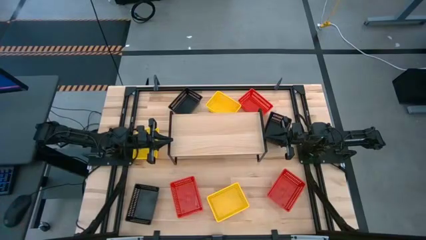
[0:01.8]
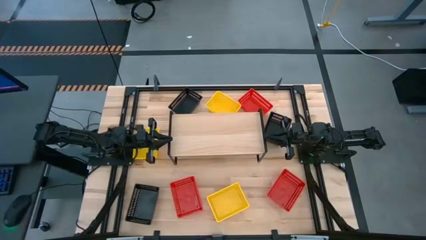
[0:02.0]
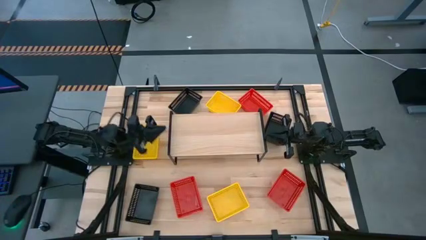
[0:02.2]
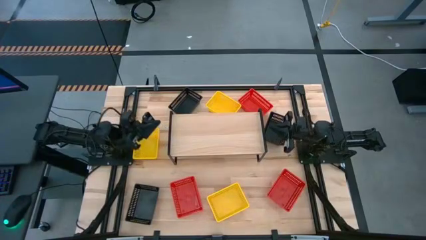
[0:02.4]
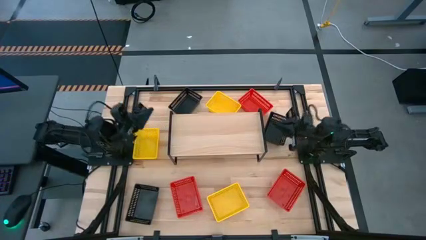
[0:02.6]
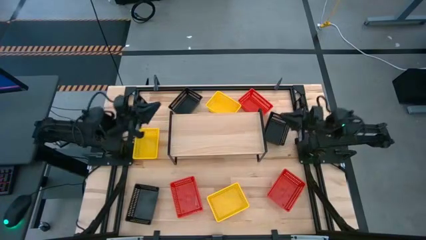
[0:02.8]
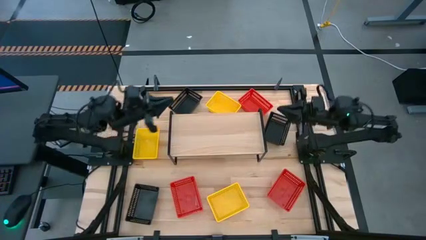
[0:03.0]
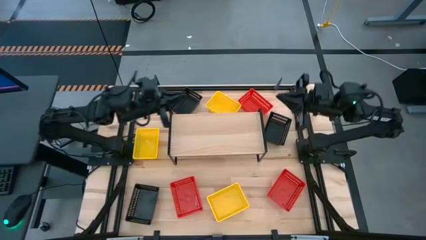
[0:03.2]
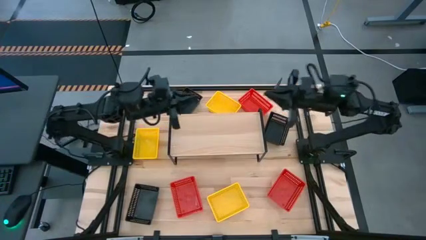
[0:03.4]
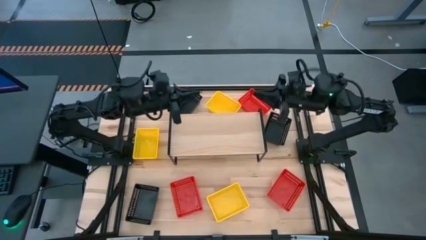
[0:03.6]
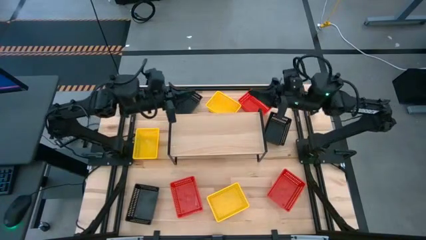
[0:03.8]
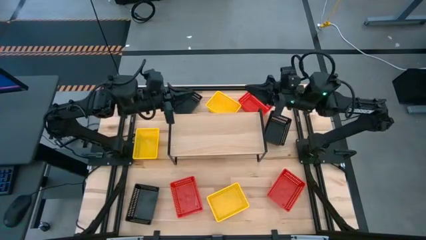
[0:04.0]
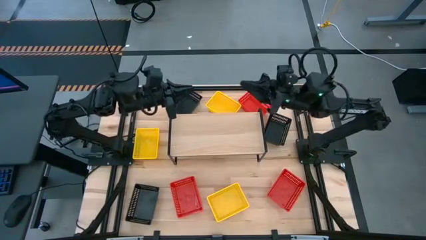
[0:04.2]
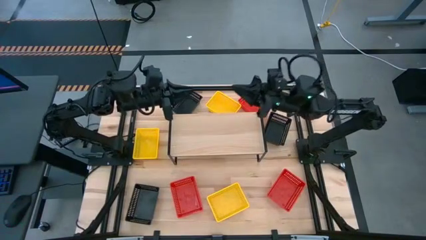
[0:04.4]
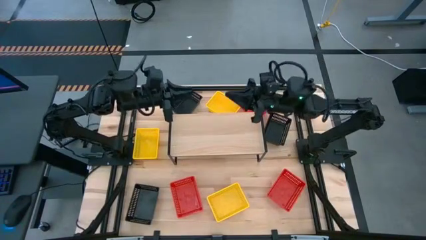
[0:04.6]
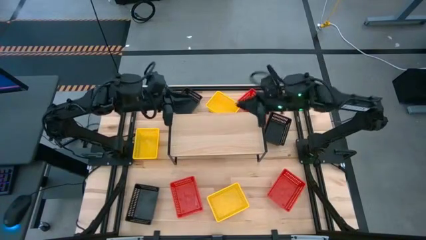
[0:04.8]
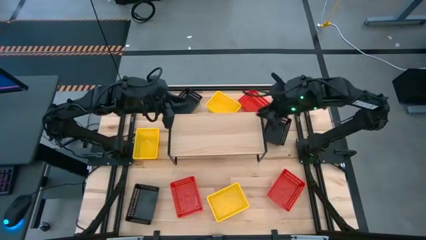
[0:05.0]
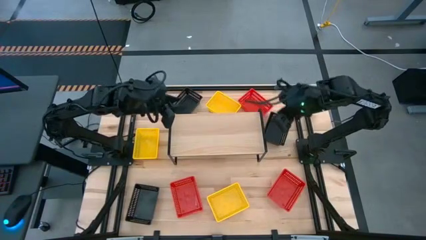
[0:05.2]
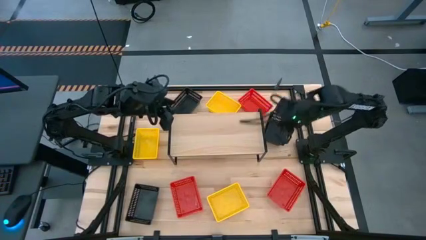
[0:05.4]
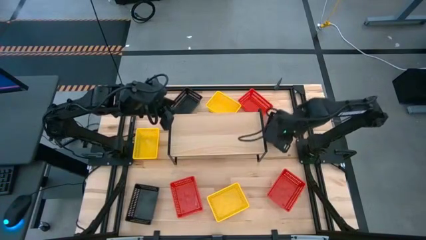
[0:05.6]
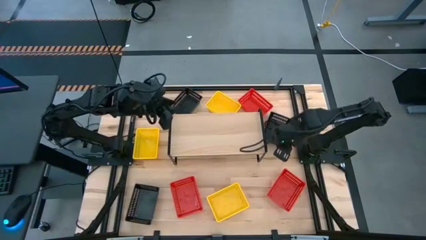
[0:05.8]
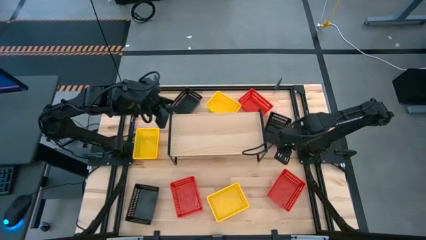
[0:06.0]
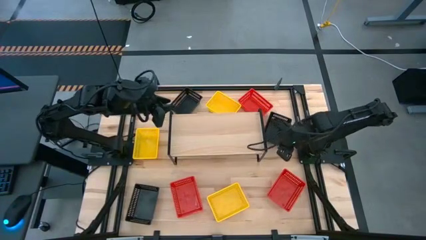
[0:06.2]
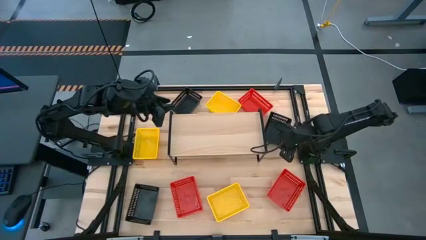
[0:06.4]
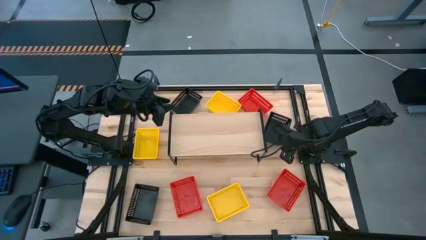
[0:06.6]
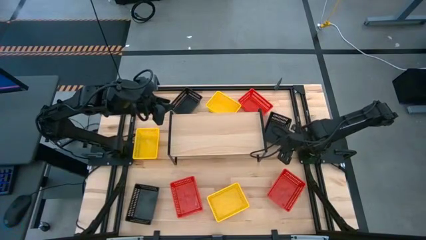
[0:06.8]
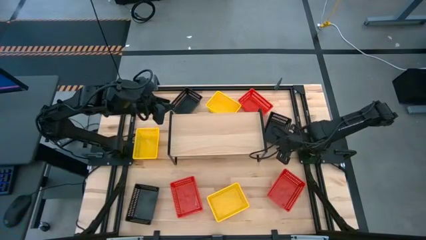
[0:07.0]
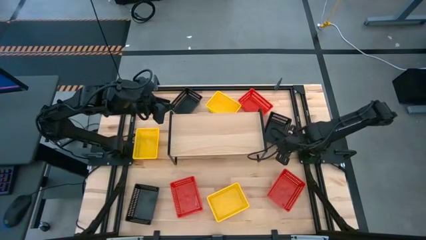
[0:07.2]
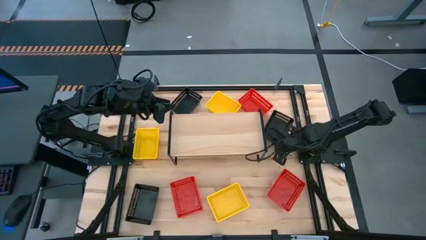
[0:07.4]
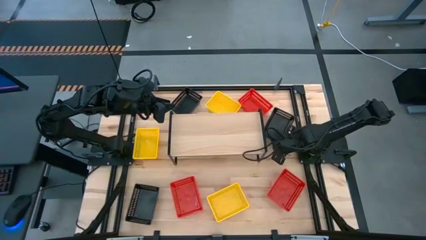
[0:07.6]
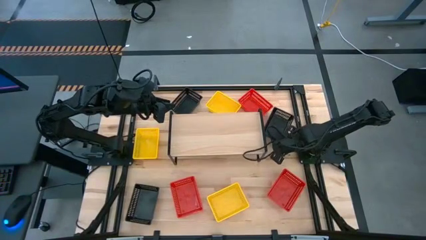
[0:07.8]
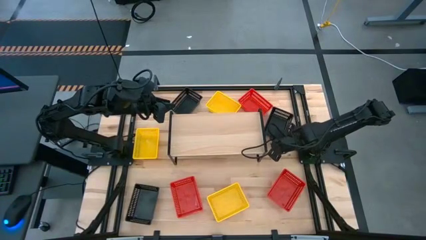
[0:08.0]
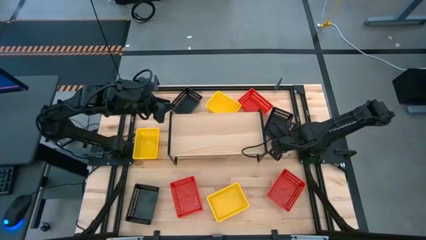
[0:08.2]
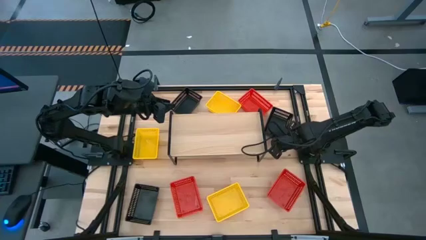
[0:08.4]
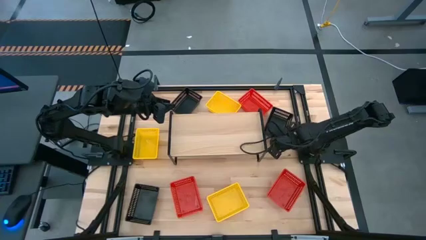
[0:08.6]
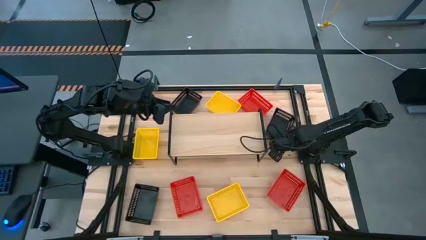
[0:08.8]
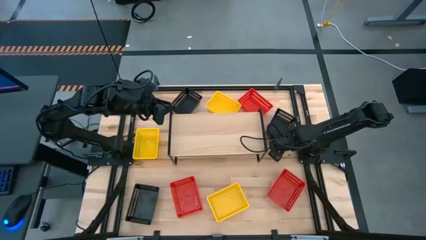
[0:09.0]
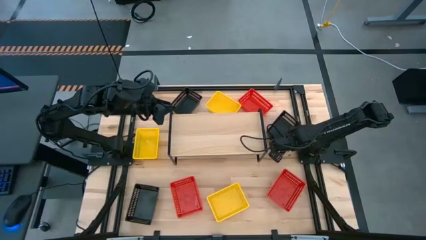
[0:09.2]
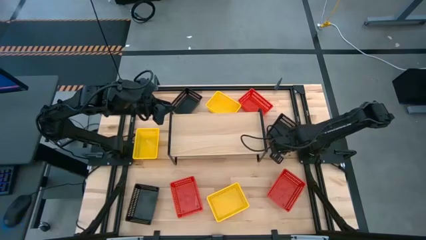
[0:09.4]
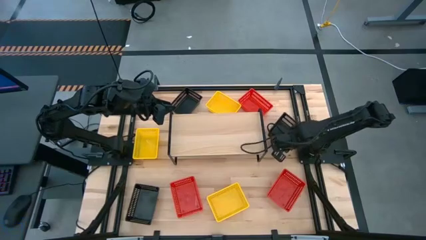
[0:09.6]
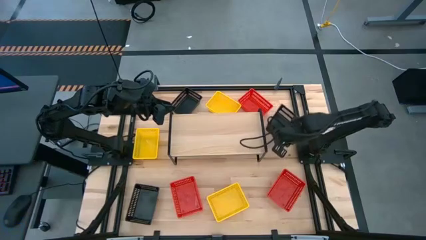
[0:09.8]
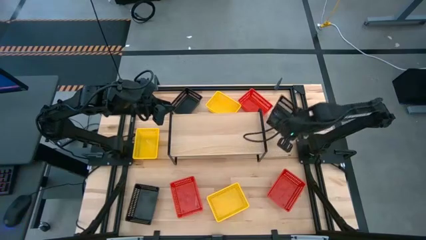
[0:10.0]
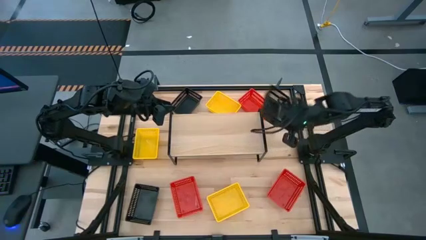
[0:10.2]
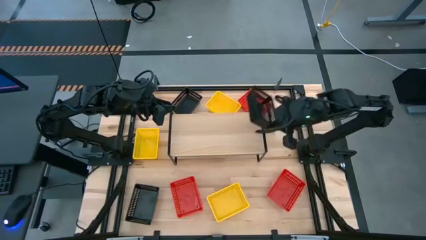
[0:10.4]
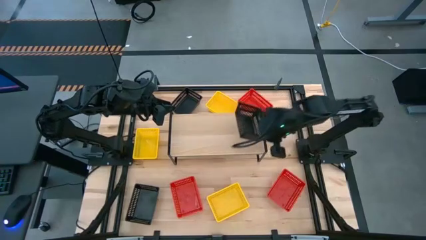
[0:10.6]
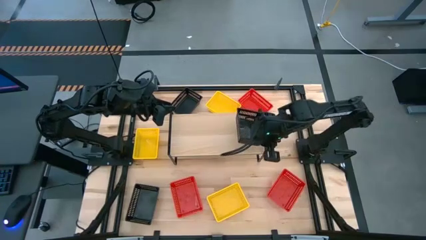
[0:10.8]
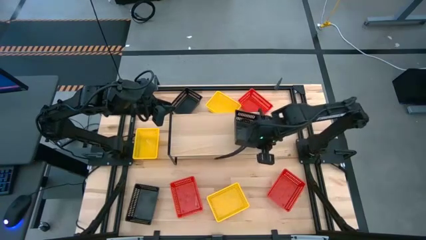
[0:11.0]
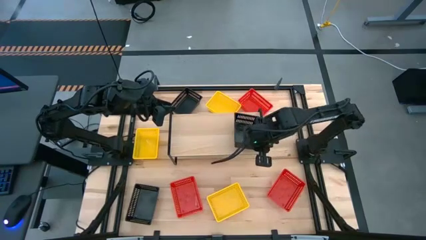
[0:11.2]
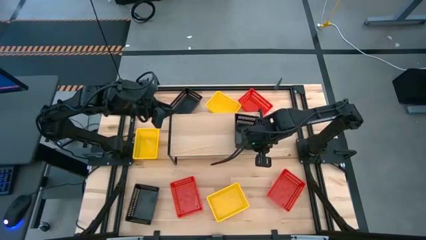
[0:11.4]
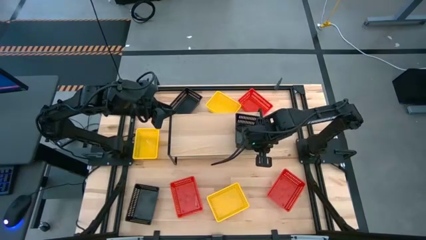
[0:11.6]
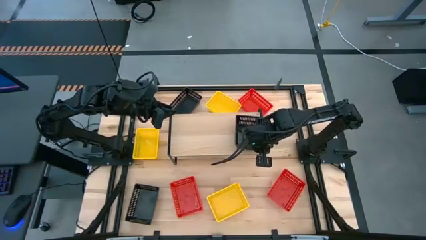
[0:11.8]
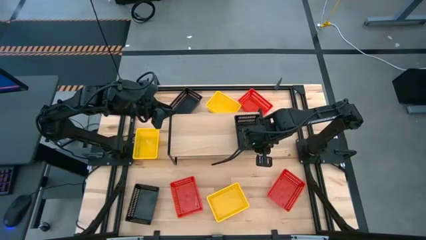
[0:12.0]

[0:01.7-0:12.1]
Task: Stack baskets on shelf by color
Put the top right black bin on the shelf

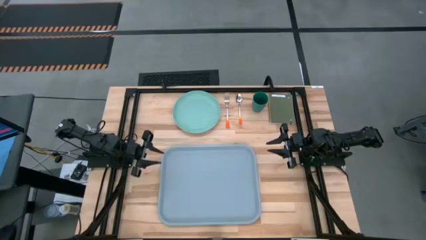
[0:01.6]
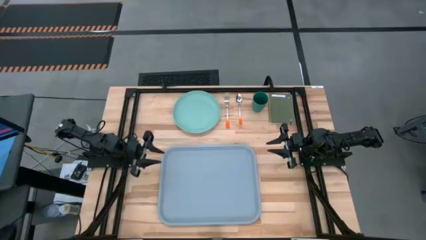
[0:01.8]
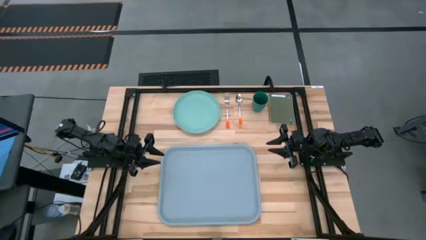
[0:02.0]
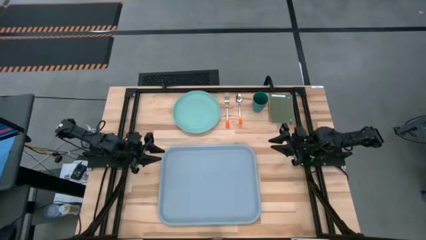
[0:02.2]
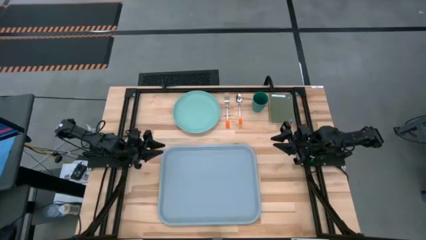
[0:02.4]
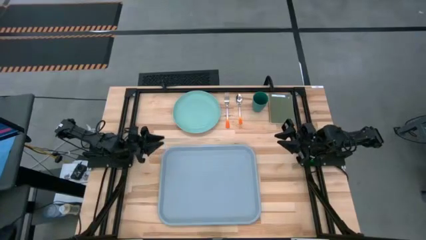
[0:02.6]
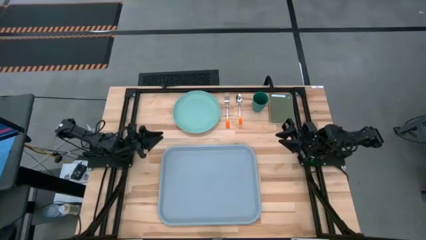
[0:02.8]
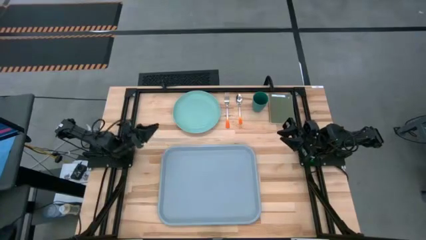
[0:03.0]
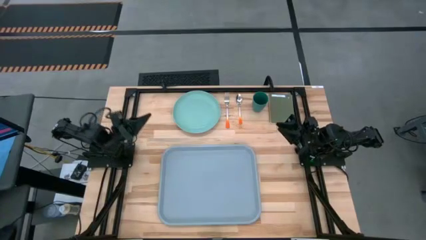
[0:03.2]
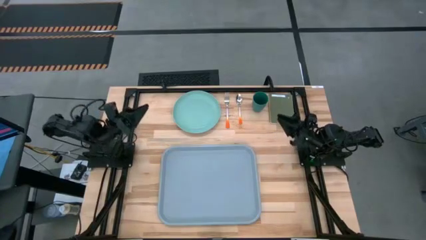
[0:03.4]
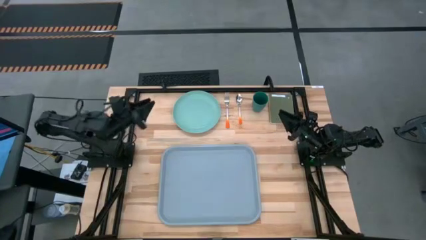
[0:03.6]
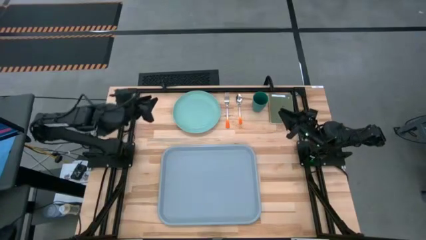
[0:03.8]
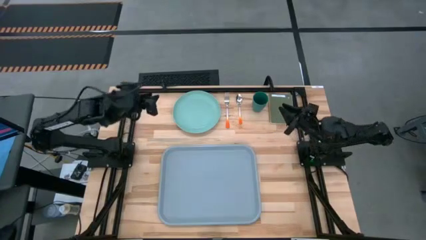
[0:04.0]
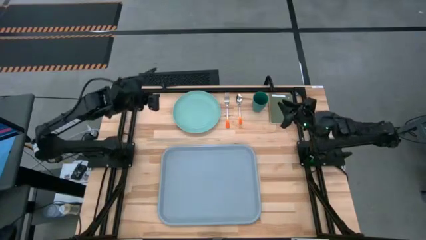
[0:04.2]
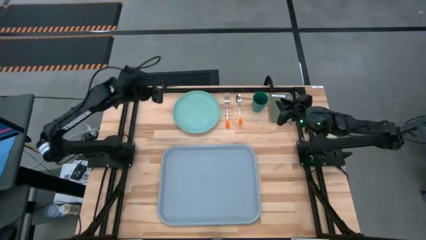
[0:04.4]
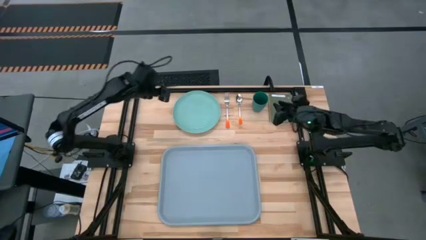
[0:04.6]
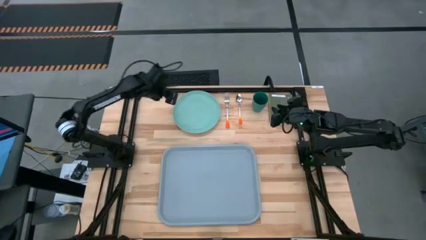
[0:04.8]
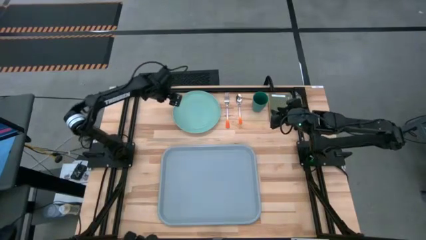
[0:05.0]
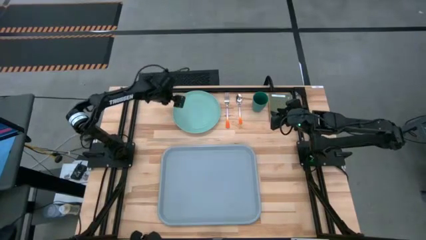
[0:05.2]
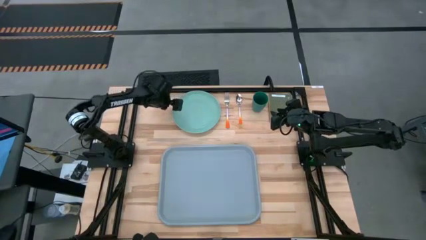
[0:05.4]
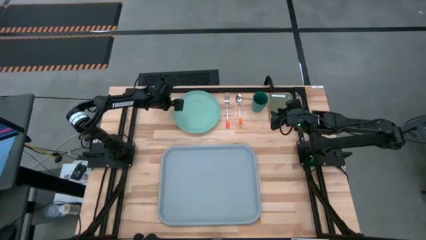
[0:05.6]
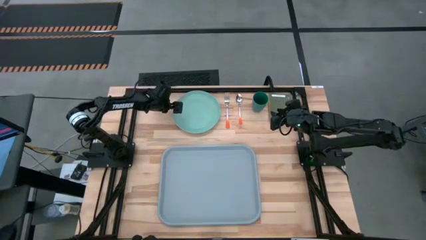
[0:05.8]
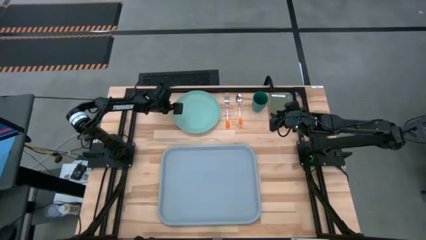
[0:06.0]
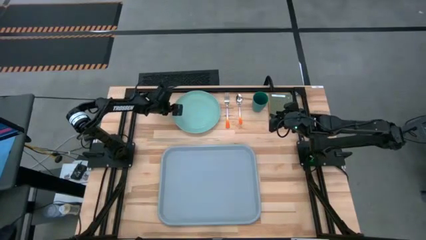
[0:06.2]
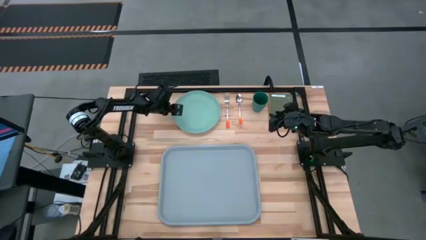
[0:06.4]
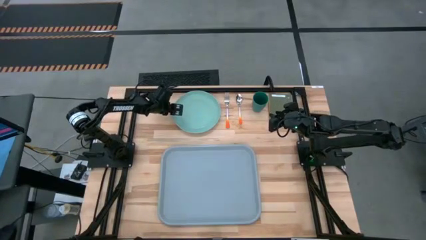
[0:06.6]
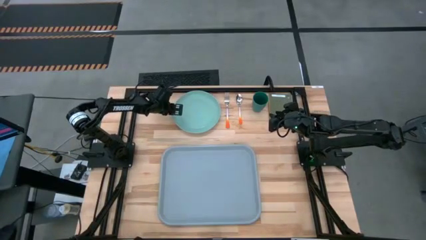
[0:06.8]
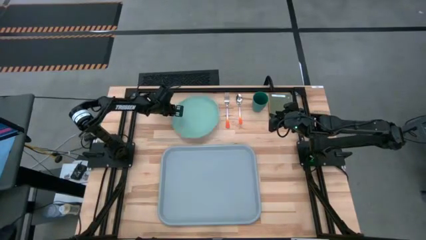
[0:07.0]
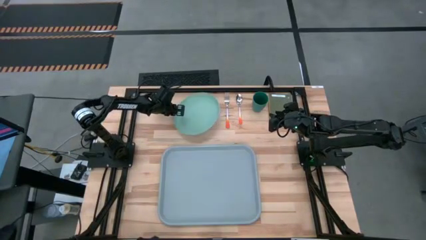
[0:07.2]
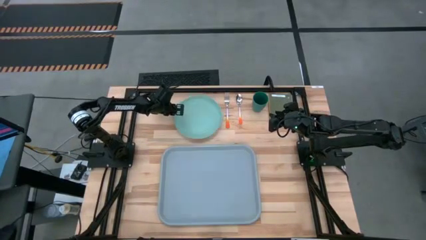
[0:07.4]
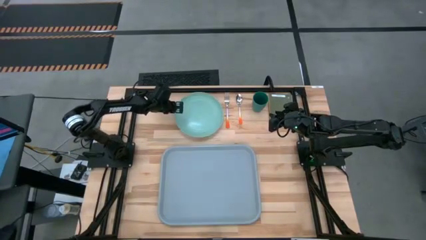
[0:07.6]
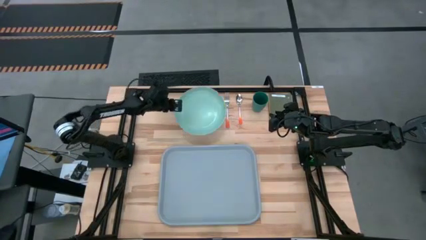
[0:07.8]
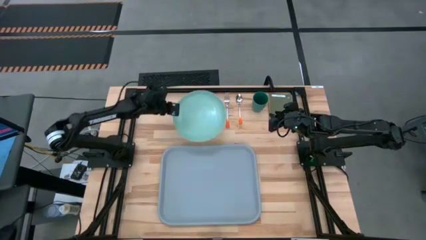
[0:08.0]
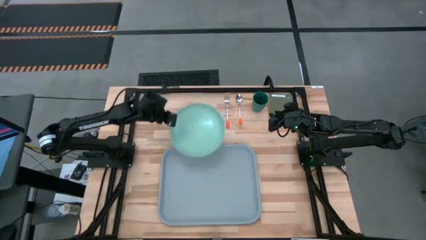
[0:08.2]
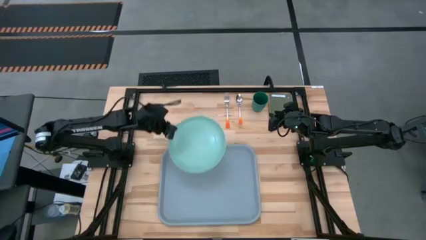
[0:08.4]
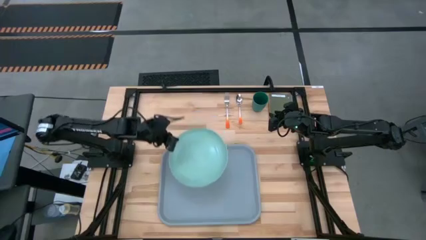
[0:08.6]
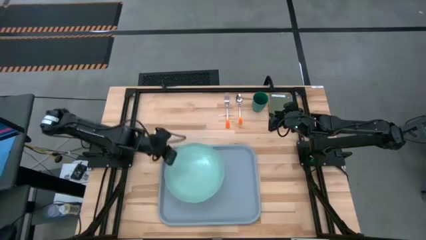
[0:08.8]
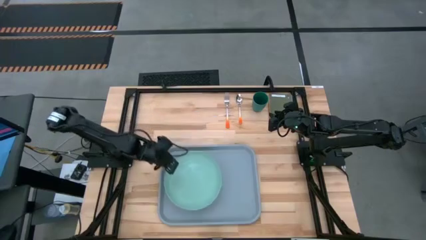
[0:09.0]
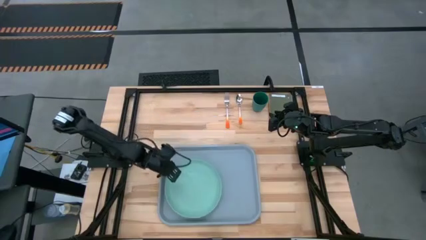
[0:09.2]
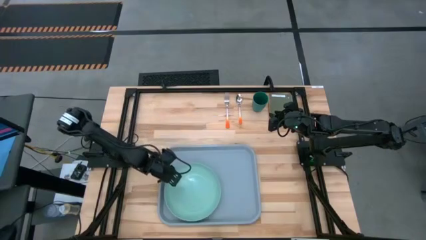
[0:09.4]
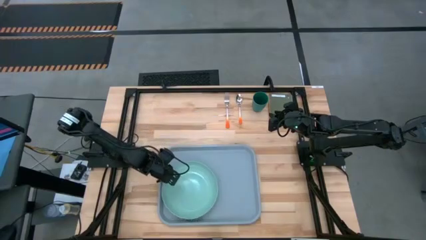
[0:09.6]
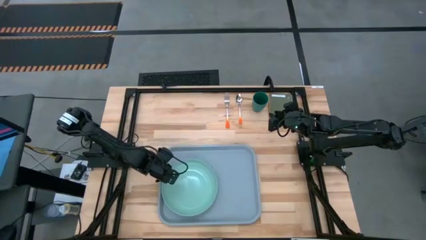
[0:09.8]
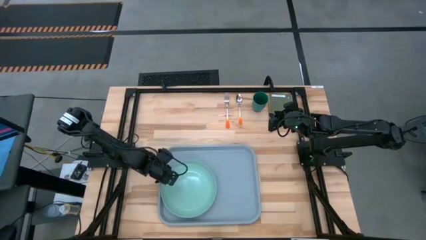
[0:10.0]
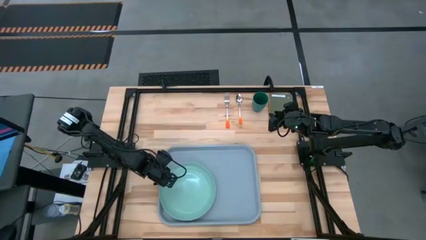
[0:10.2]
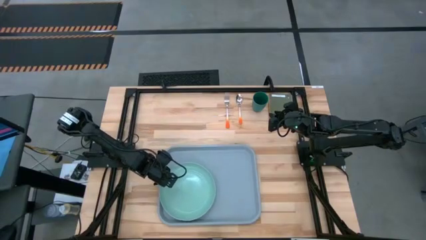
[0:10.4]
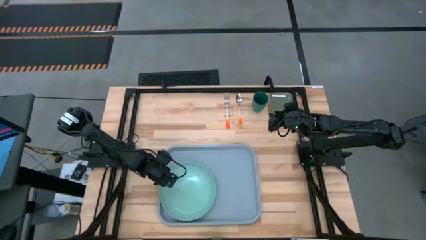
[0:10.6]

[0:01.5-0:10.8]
Task: Pick and place plate/cup/fork/spoon on tray
Put the green plate on the blue serving tray
